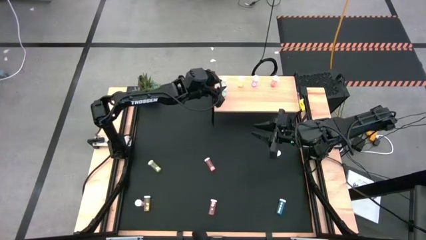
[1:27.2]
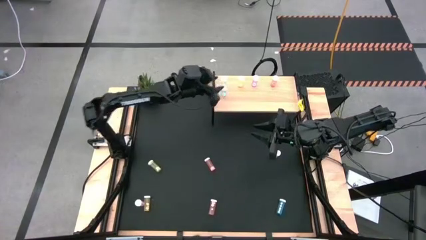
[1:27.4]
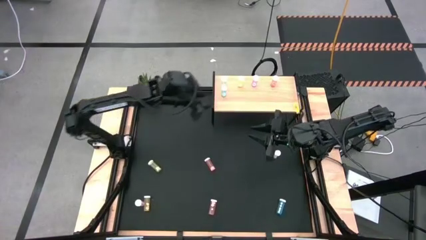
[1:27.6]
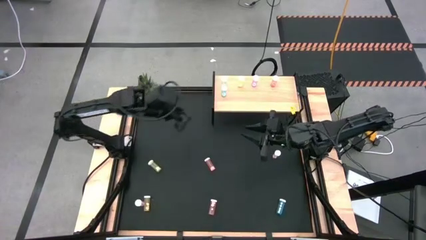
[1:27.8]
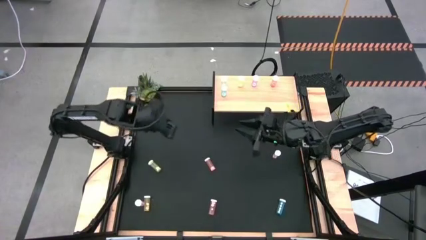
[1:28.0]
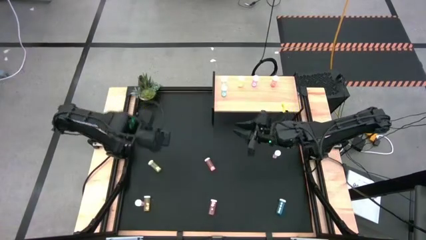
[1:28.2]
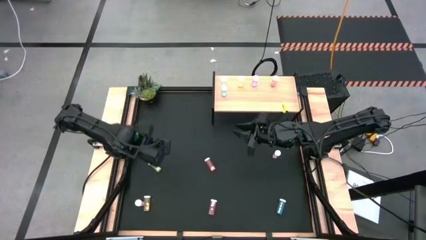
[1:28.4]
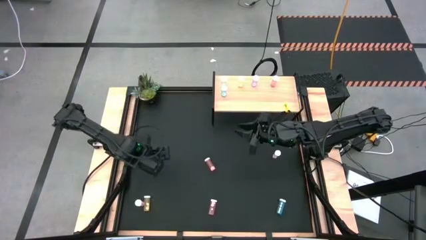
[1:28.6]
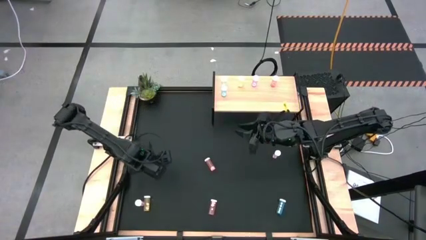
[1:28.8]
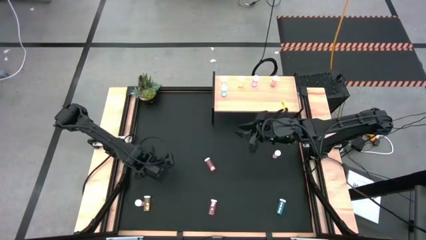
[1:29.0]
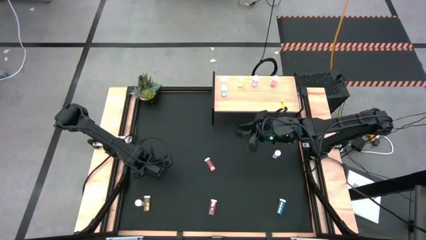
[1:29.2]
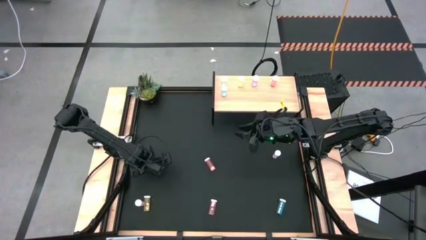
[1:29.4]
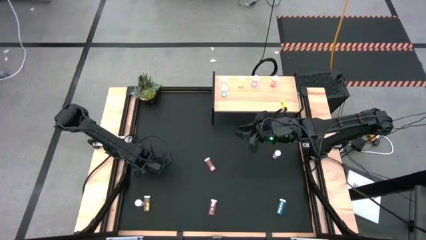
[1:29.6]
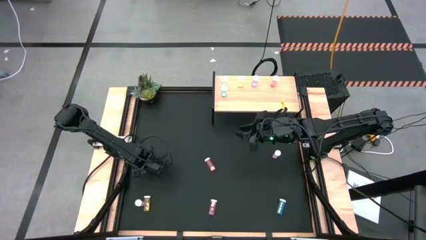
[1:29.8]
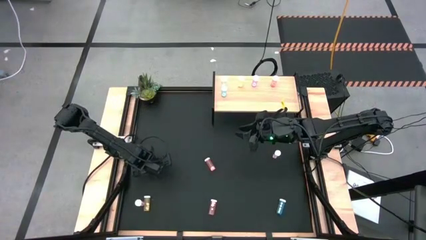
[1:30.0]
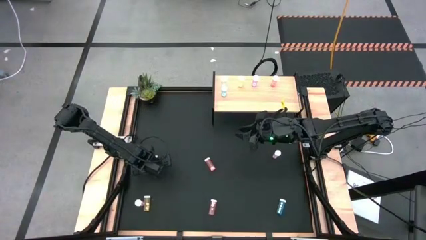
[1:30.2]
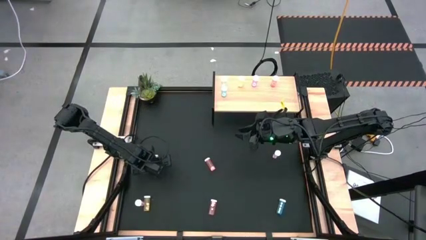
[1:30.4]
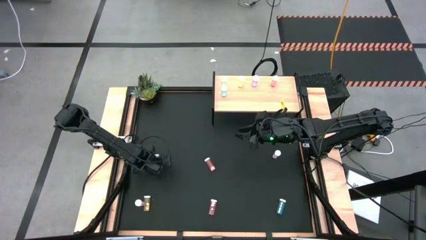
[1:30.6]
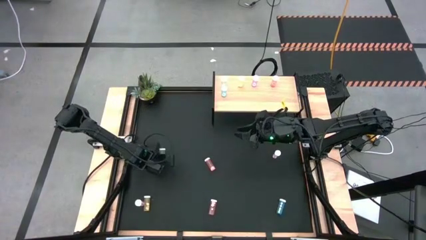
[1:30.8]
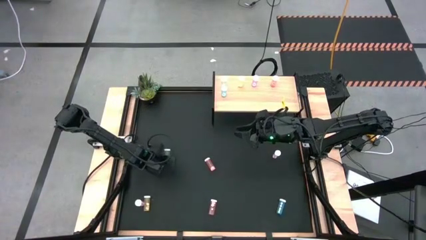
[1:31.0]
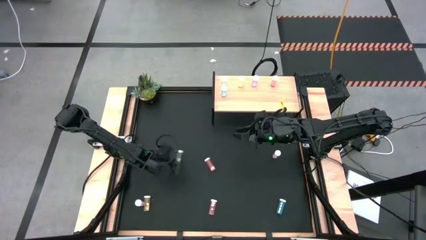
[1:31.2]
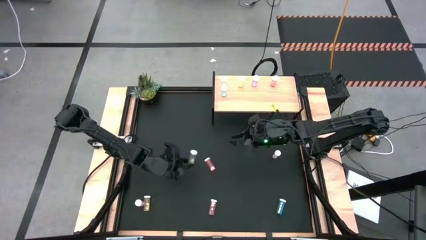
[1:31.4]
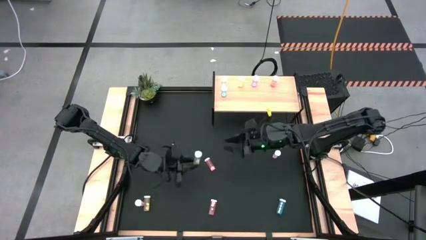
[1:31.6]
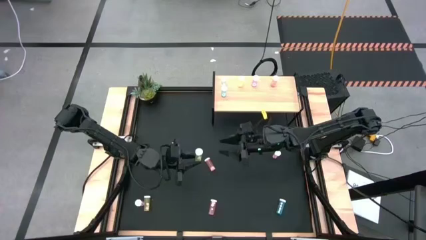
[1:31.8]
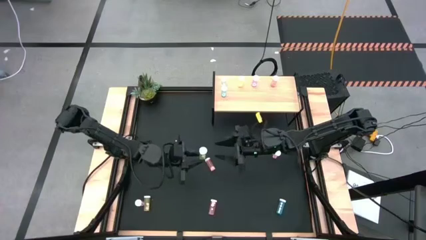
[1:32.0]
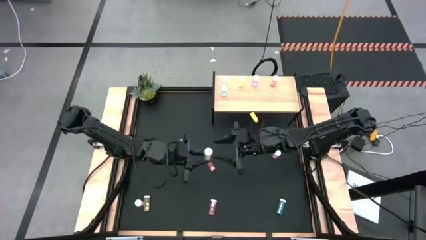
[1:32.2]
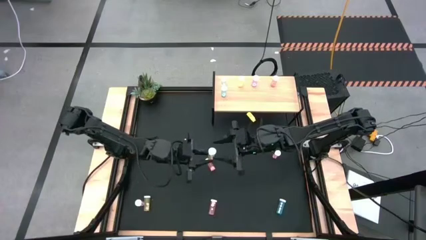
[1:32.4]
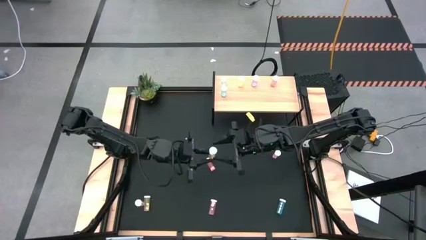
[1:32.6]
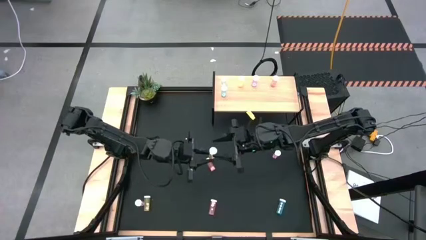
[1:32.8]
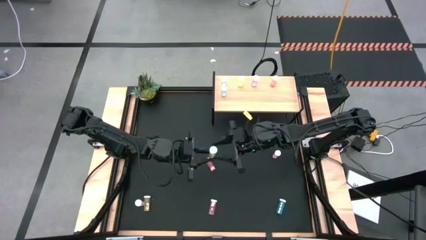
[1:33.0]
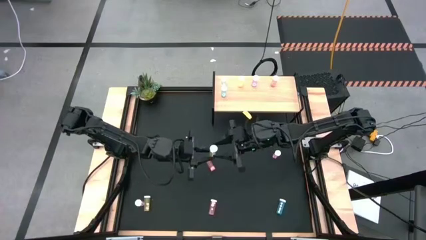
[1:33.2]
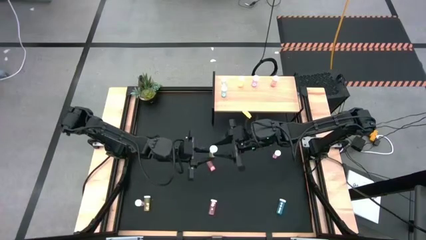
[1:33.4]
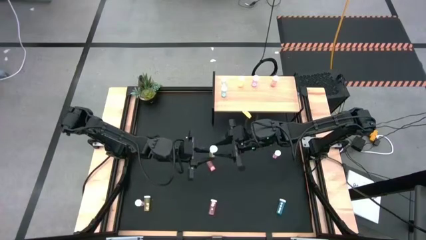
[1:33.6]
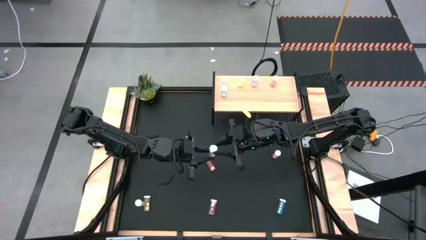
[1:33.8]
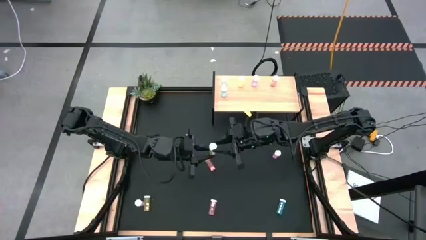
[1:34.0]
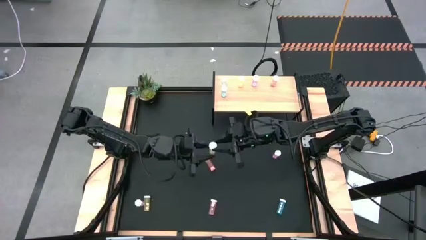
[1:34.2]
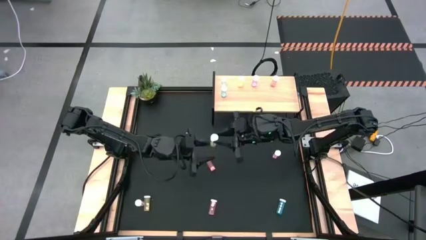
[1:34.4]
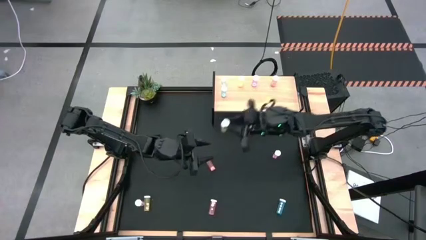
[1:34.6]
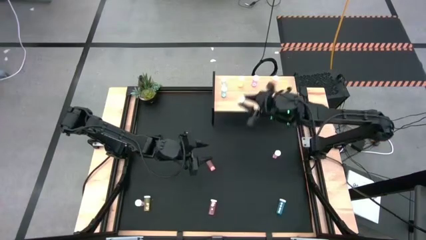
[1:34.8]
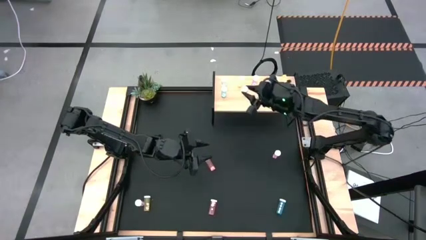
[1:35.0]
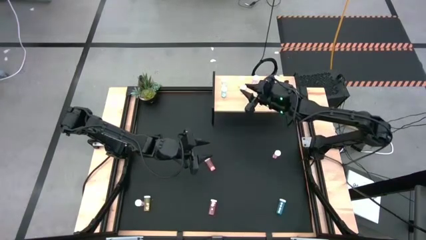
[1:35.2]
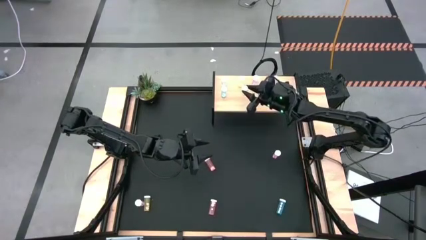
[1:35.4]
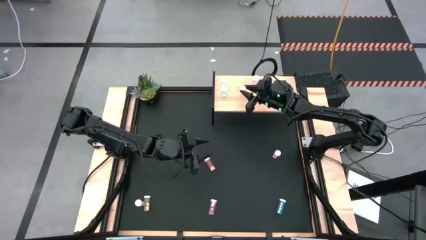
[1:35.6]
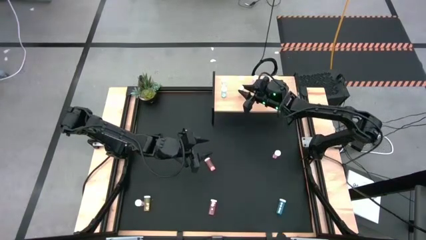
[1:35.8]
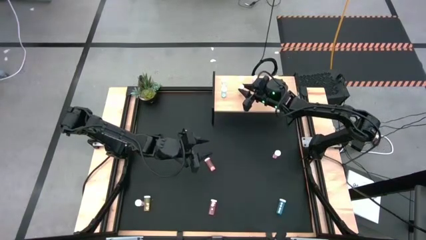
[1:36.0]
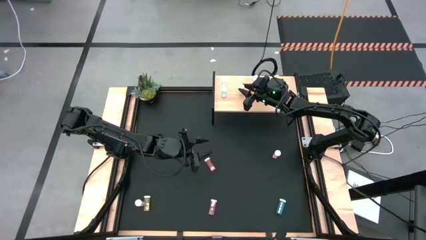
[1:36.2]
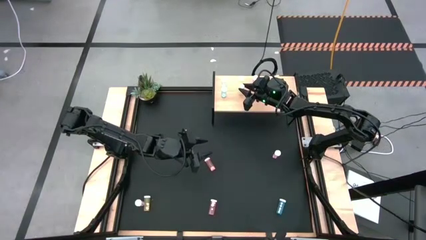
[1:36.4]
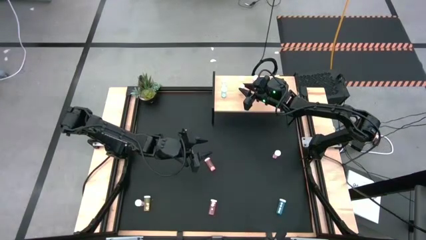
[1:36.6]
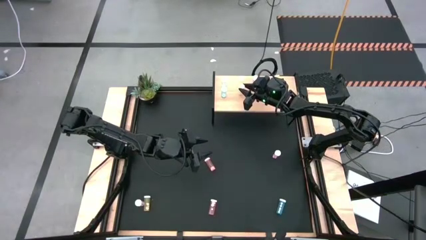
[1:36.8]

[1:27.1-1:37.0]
Task: Pick and place medicine bottles onto shelf by color
Put the top yellow pill bottle on the shelf aligned with the other yellow pill bottle

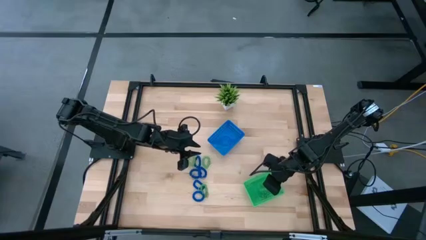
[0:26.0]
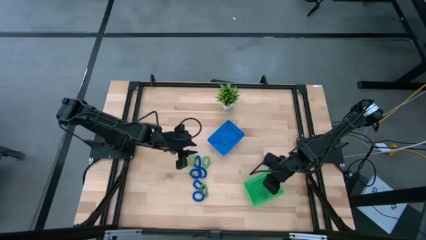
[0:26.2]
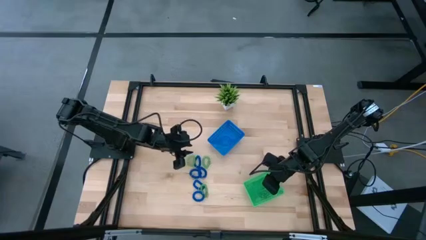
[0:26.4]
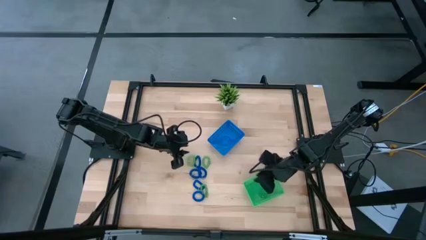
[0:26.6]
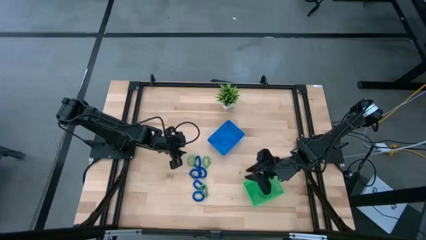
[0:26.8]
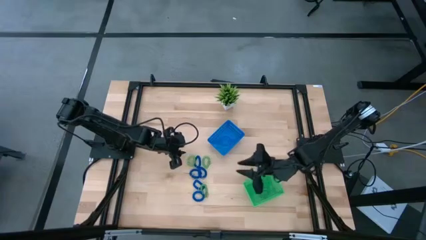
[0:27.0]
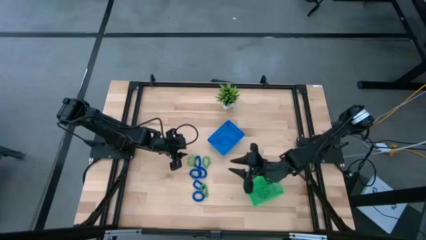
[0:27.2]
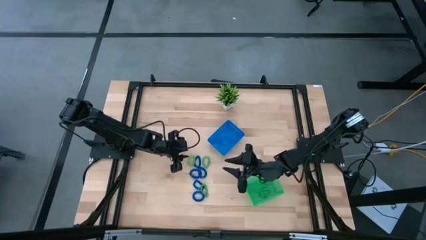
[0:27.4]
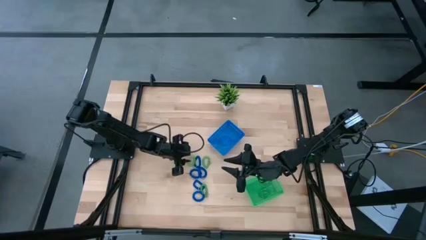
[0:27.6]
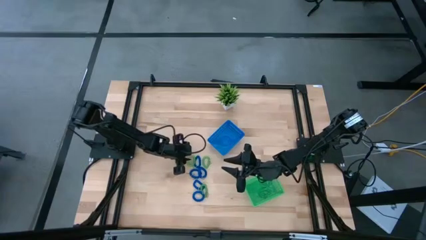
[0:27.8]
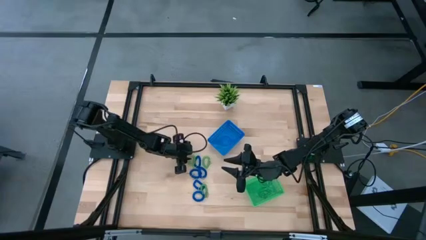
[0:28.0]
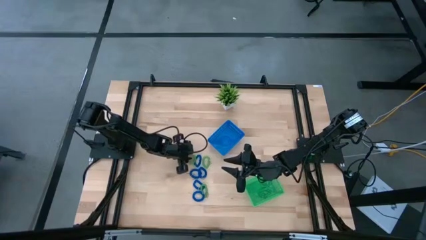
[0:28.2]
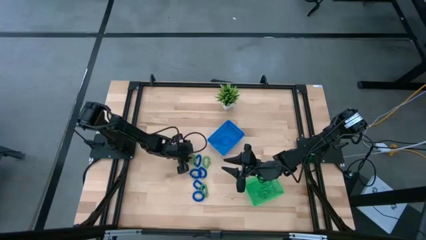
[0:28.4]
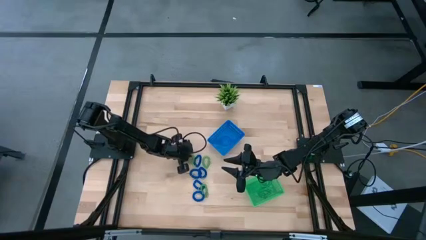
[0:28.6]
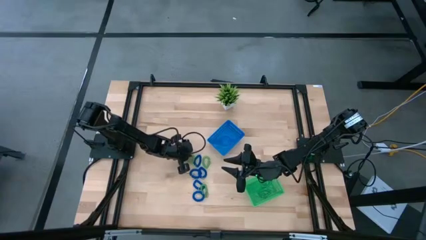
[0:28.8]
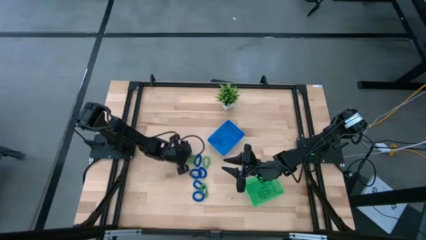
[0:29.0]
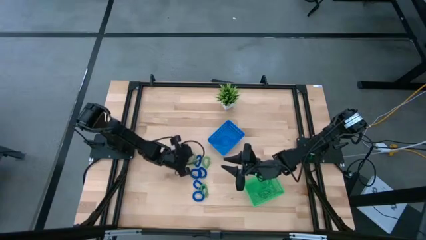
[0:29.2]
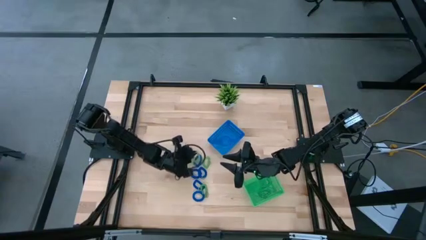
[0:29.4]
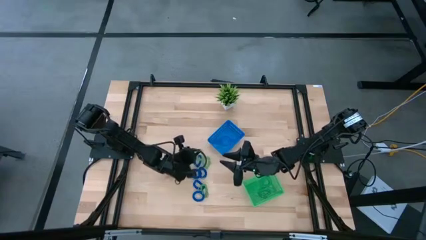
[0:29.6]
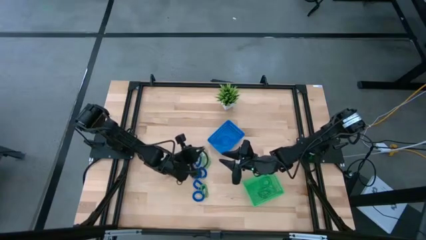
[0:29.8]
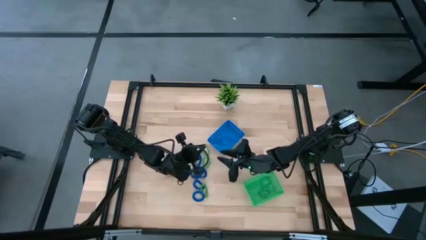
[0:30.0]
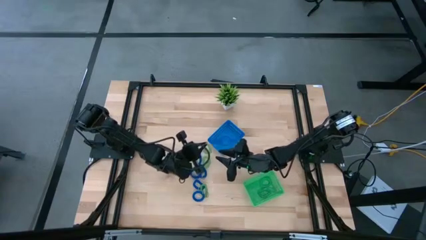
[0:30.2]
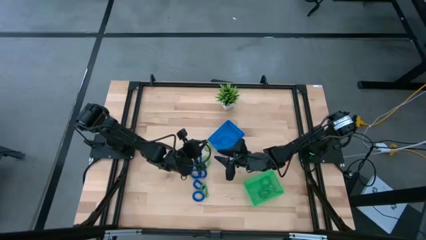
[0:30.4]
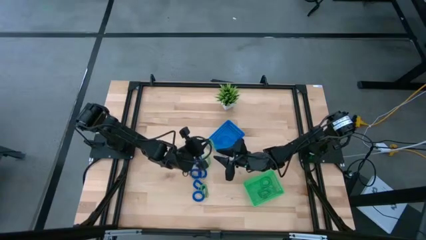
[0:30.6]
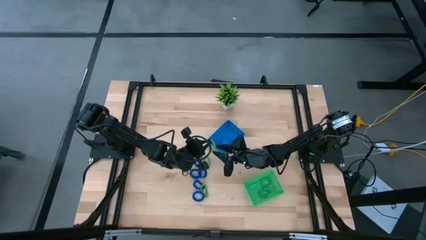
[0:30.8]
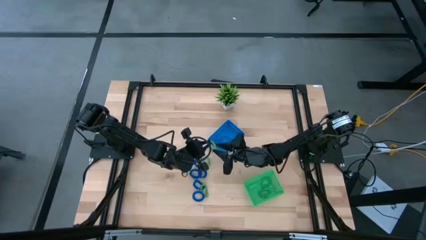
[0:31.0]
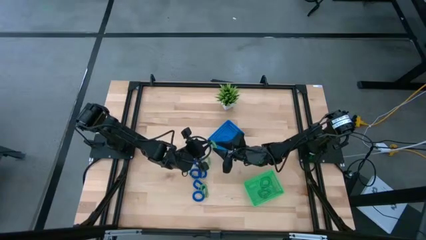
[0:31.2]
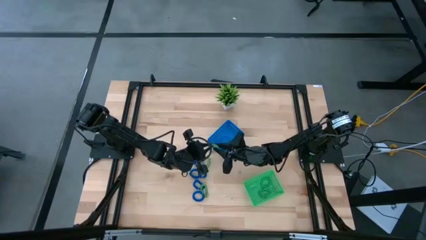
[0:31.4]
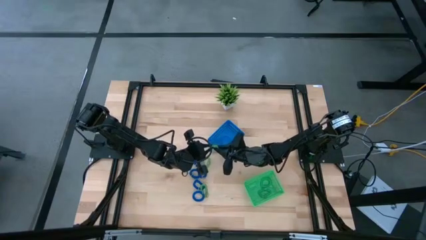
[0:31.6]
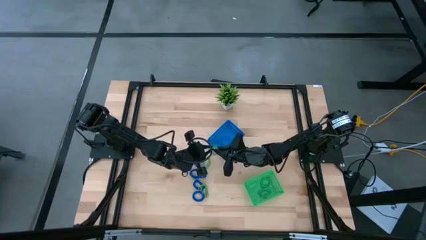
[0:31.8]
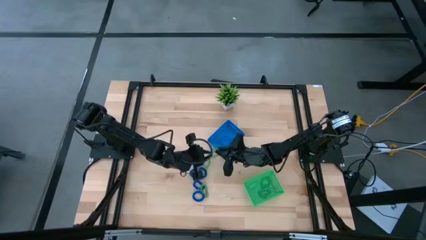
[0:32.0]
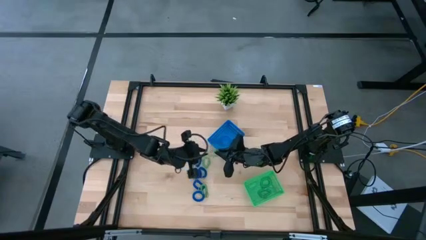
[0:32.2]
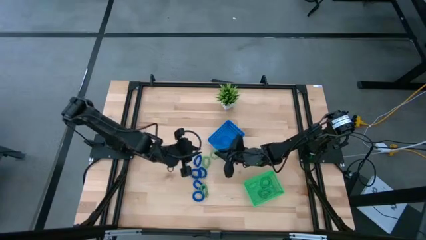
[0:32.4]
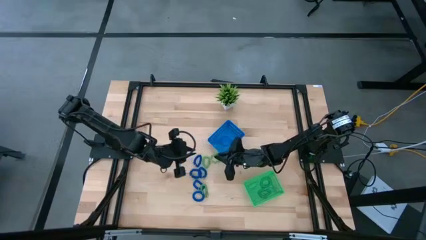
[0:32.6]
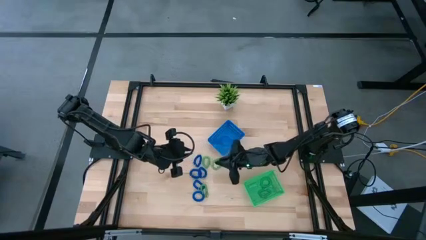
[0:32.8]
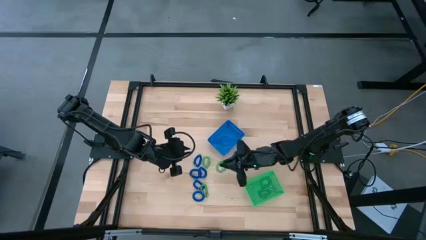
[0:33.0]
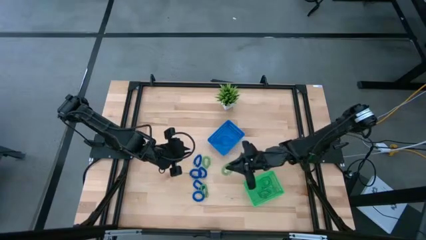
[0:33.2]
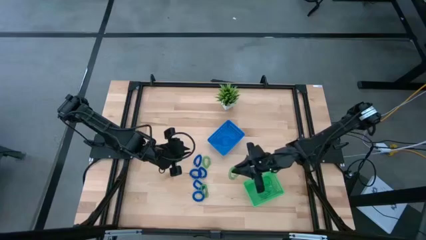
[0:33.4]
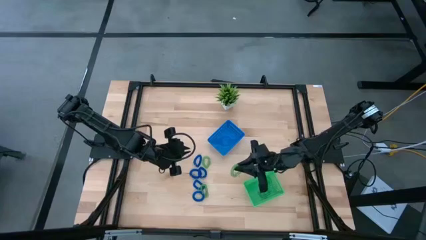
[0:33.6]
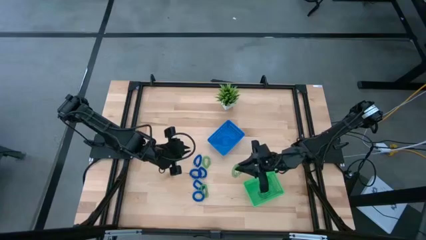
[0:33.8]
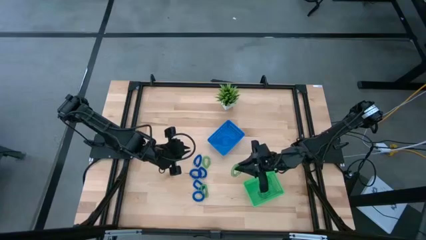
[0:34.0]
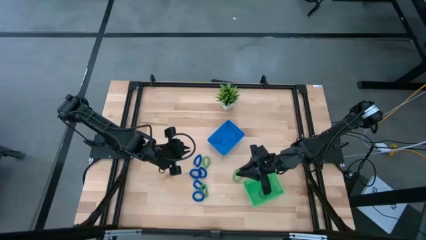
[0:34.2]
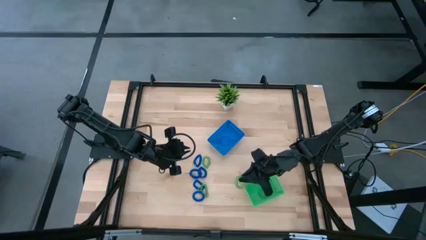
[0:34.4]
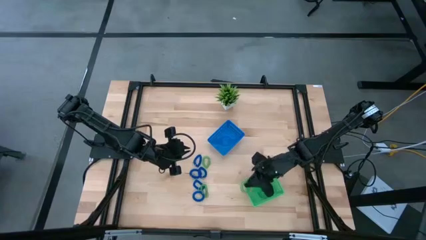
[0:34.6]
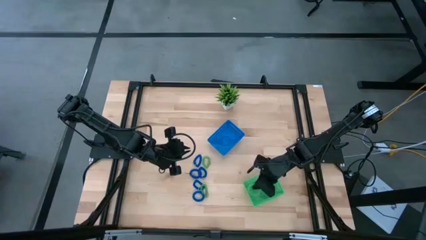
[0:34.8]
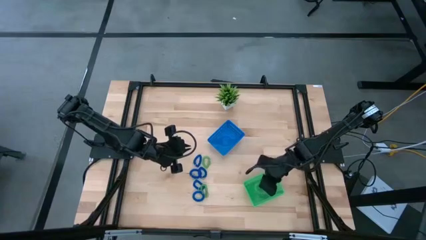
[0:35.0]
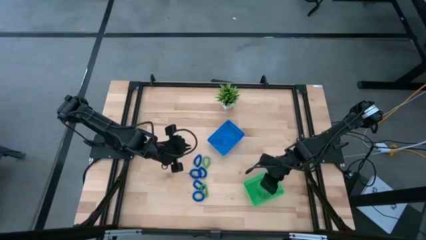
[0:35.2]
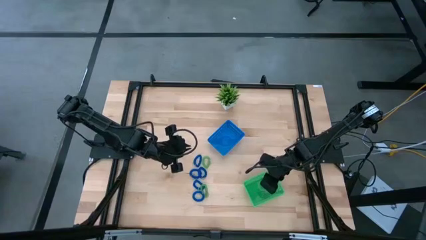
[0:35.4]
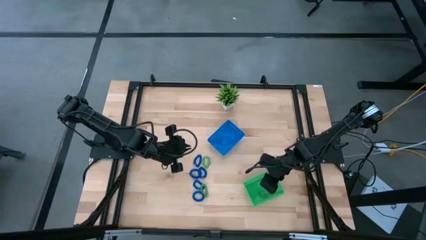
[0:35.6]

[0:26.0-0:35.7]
Task: Sort spring keychains
Put the green spring keychain into the green bin
